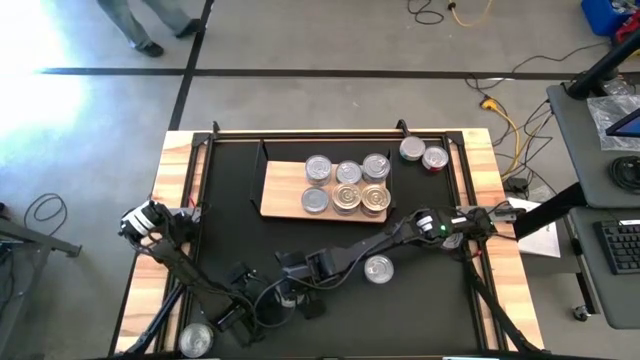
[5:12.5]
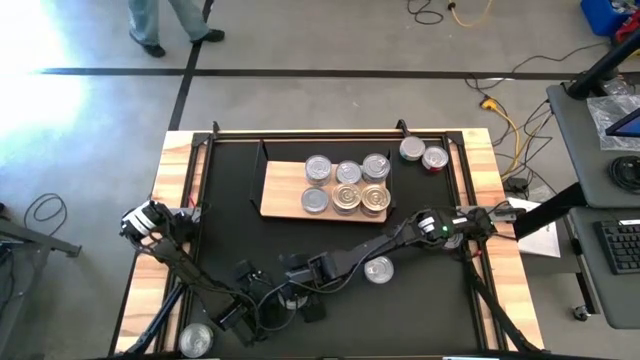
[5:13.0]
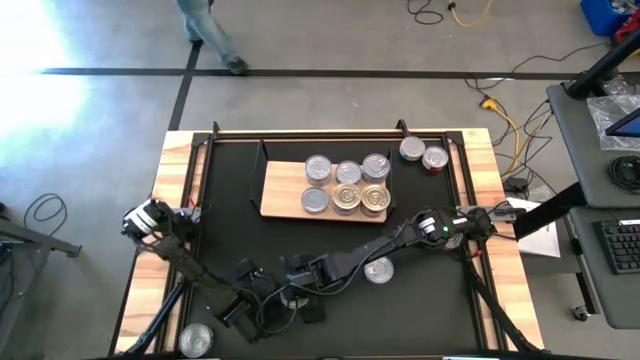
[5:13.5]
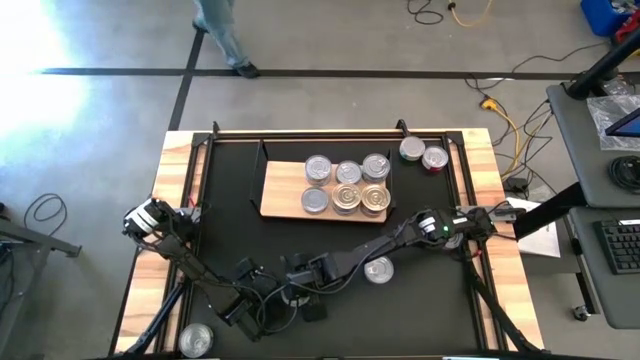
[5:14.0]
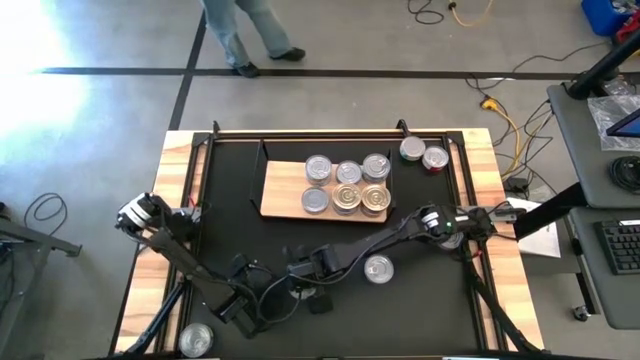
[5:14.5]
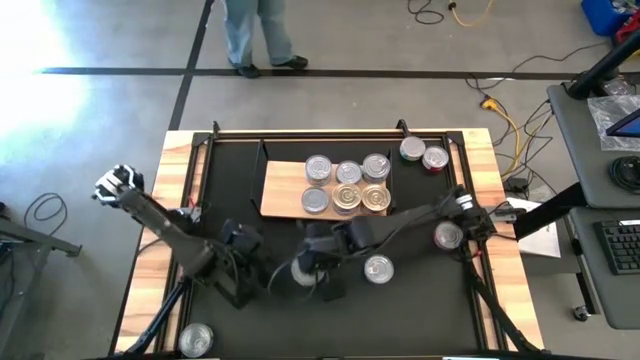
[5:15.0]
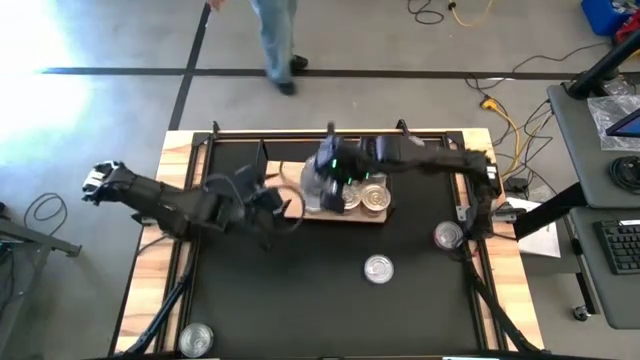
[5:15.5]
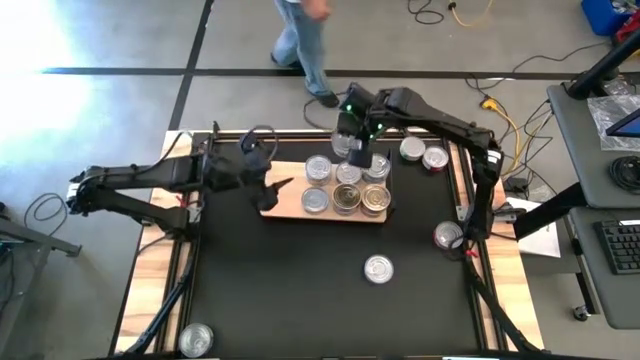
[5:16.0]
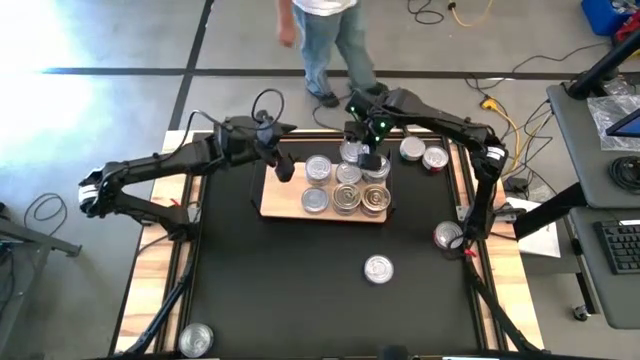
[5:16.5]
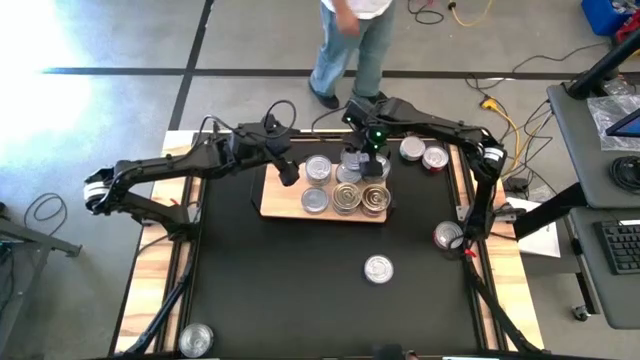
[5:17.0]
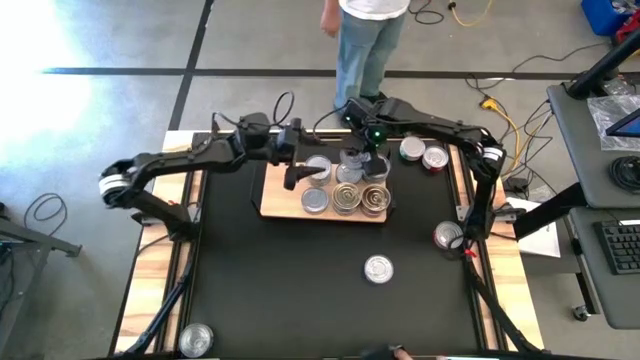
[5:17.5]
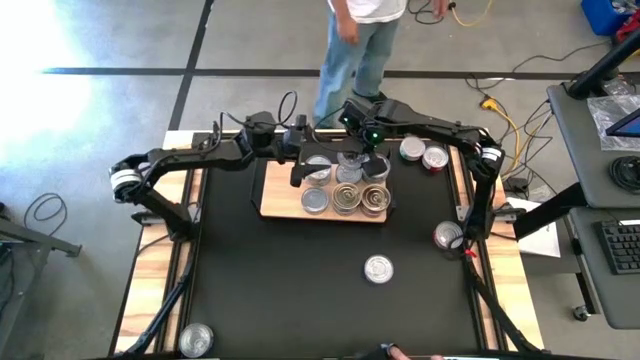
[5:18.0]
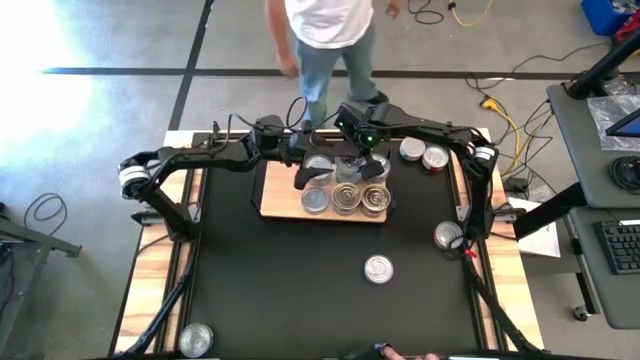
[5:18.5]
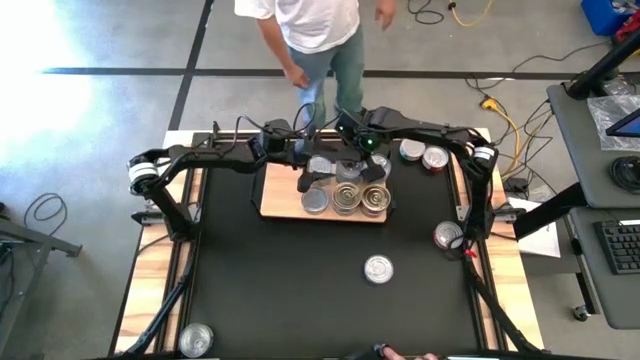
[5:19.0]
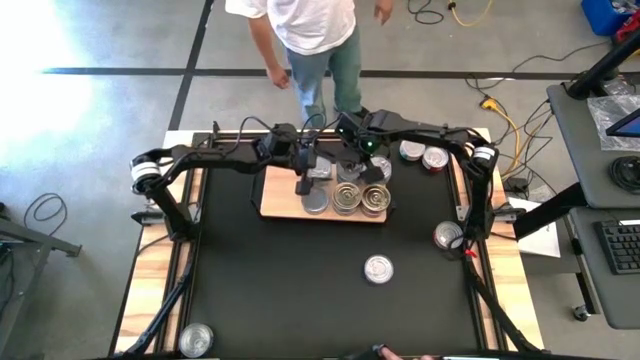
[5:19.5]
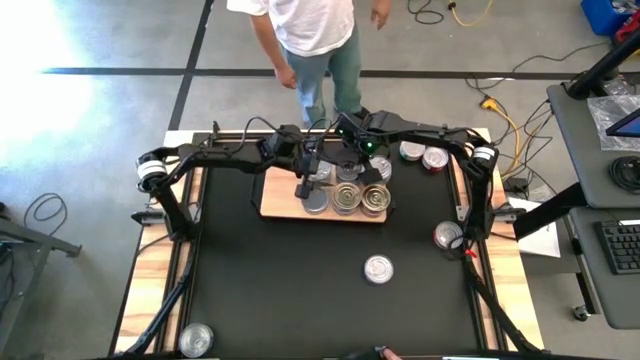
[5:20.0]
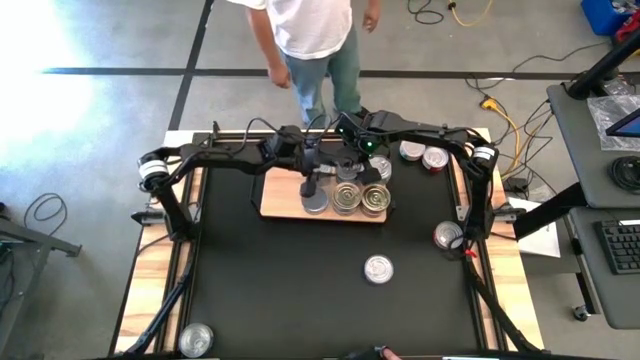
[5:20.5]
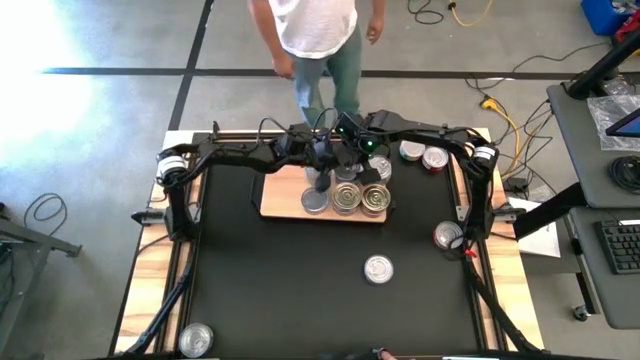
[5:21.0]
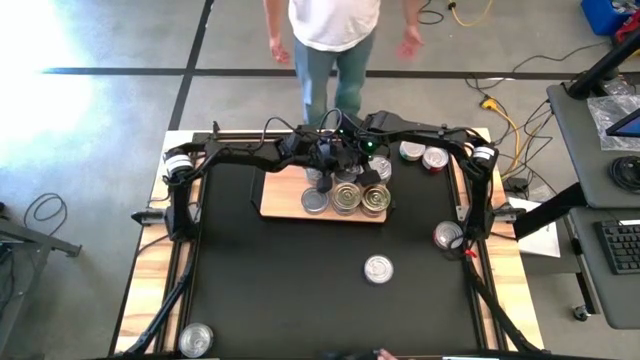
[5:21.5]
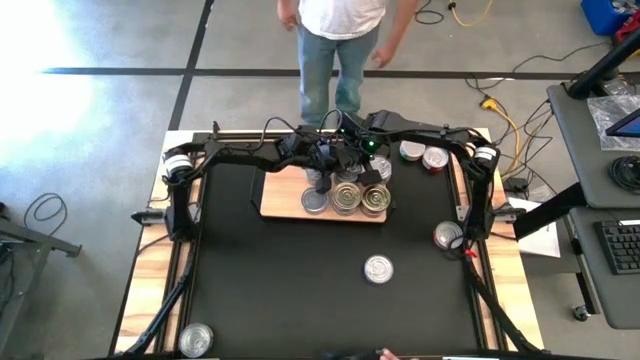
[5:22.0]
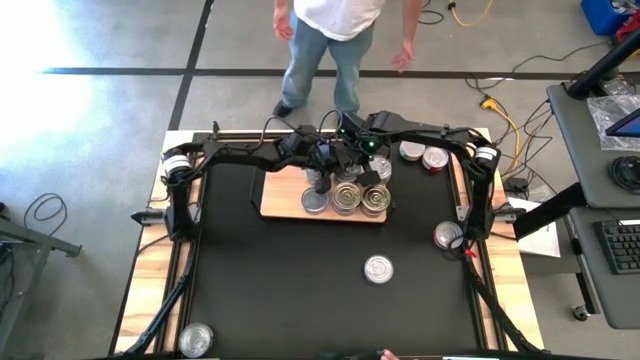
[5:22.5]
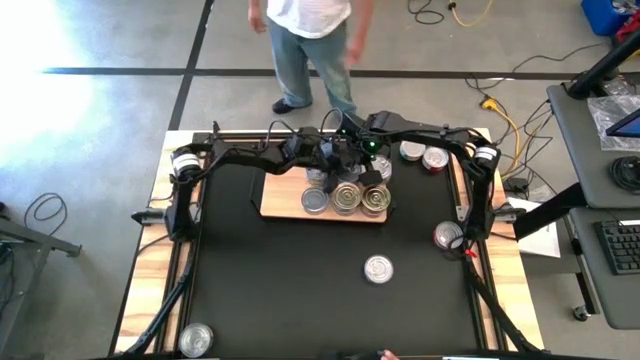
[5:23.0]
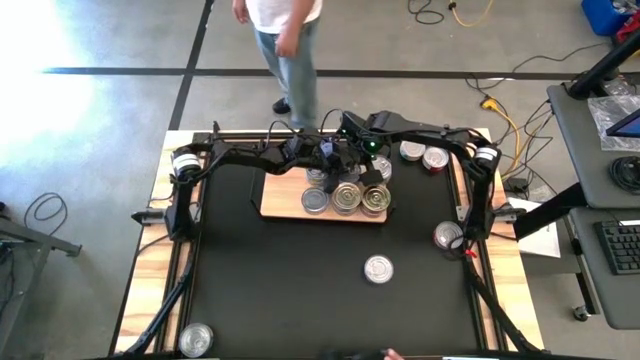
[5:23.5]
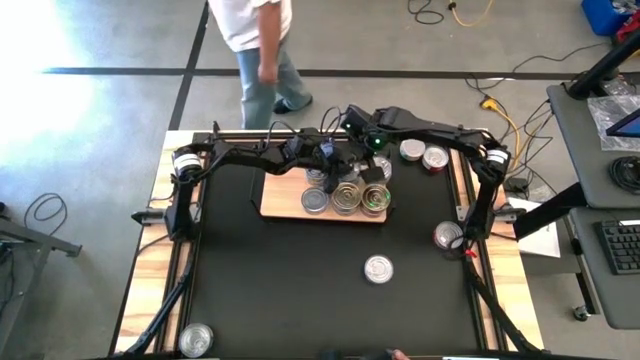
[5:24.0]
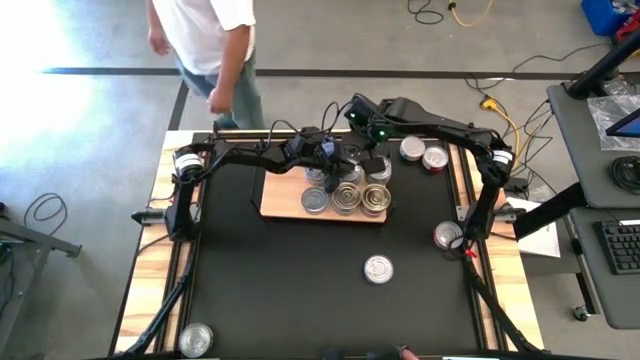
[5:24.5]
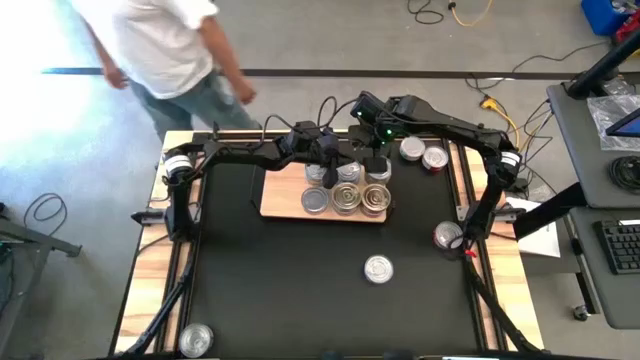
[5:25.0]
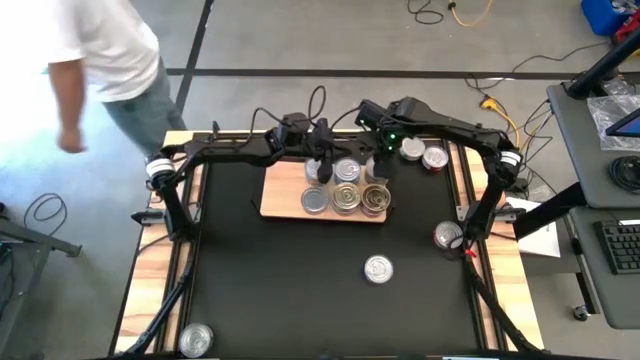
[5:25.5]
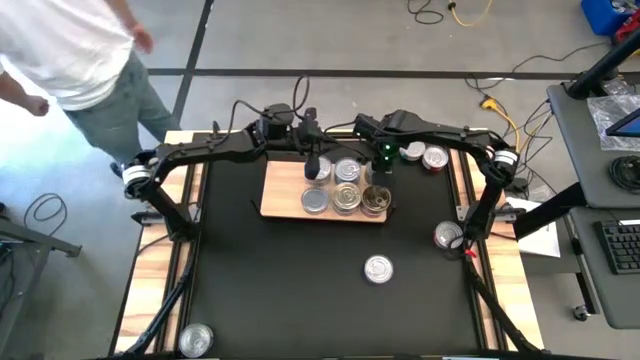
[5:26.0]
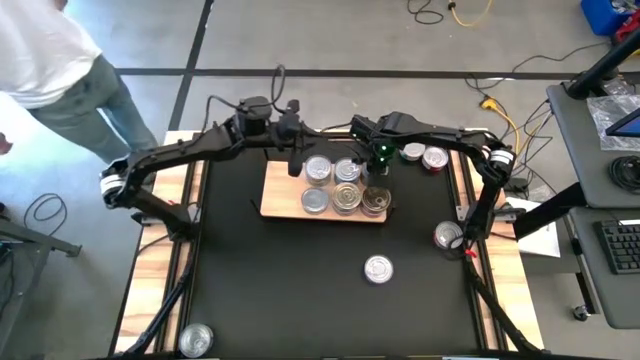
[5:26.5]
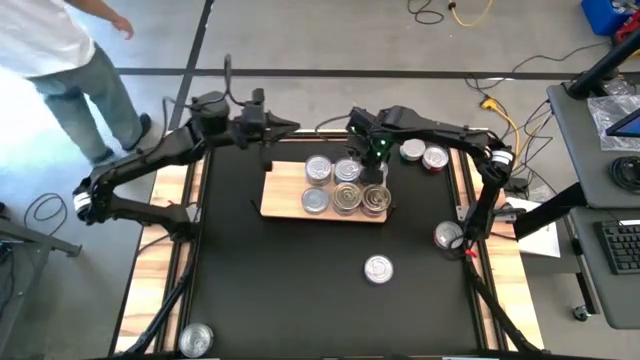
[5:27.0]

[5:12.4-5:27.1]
Task: Stack canned seafood by type on shelf
Stack the bottom left light blue tuna can on the light blue tuna can

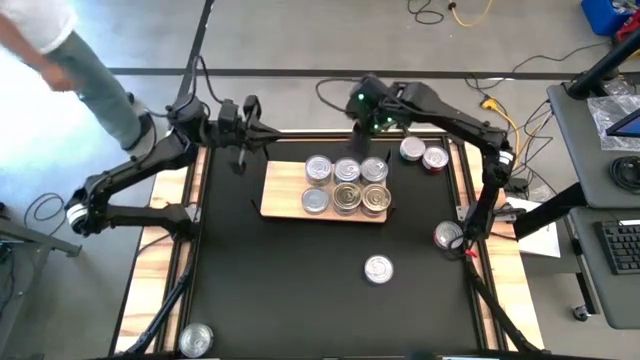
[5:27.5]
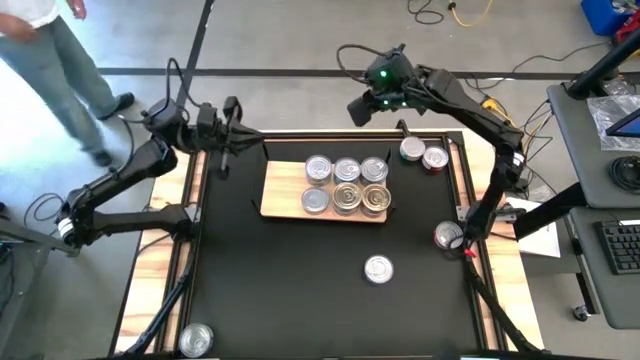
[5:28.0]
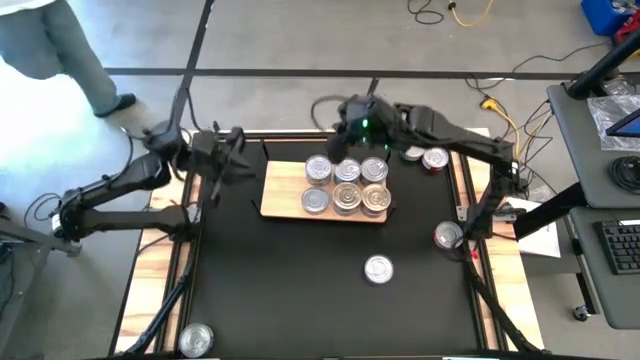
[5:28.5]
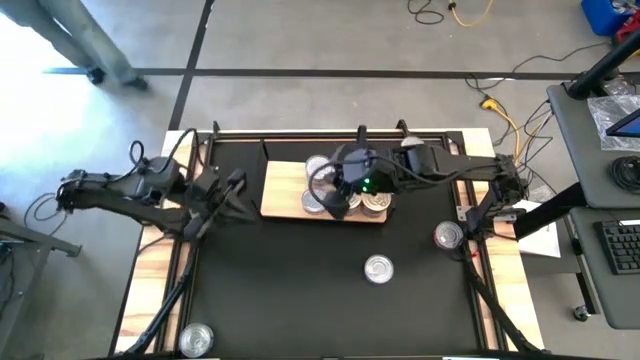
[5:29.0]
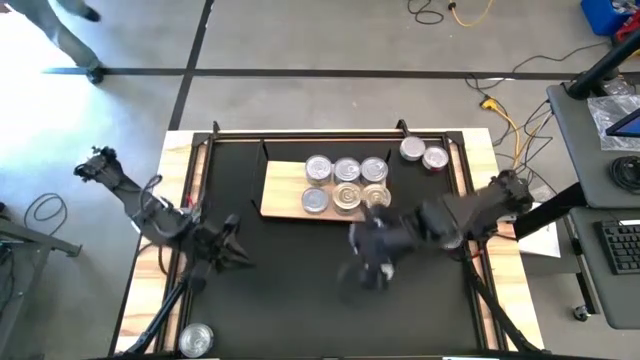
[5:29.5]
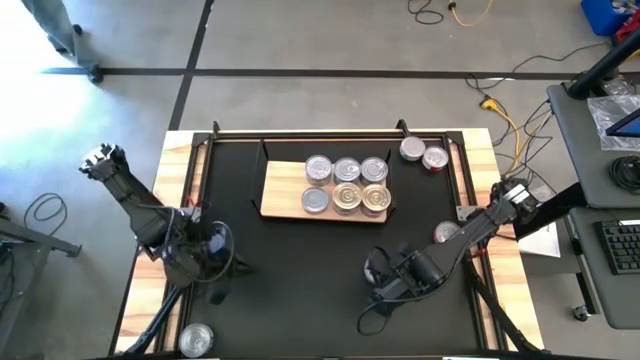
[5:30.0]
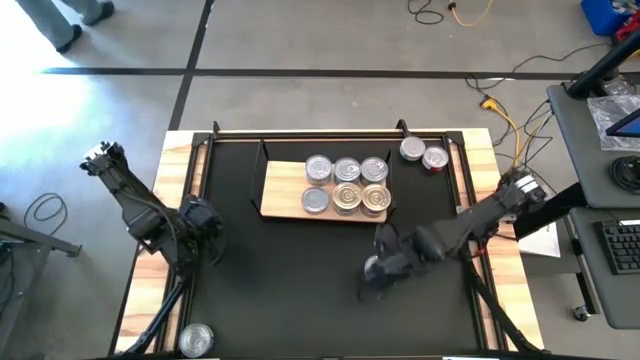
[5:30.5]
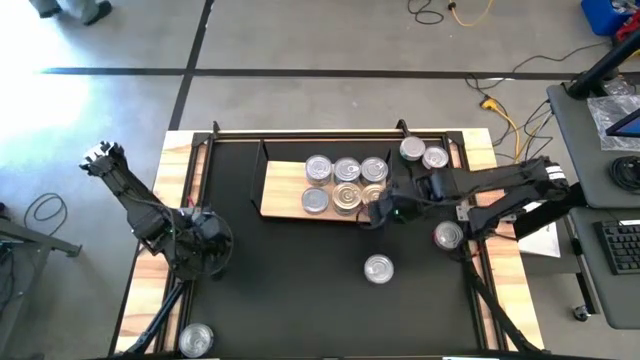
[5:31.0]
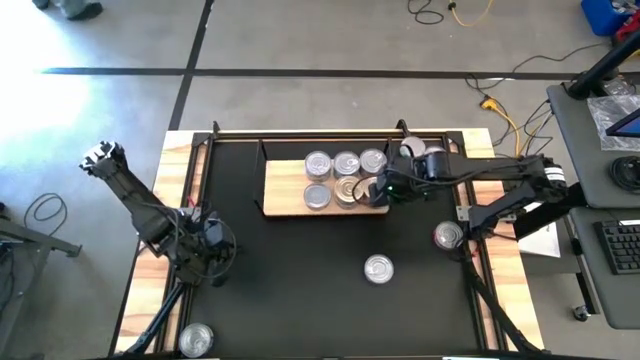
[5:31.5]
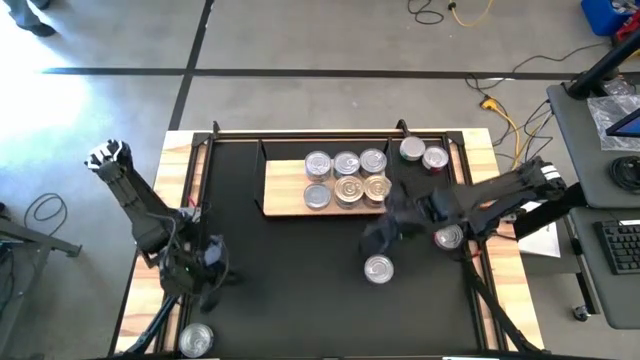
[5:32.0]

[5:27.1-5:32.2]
Adjust the shelf

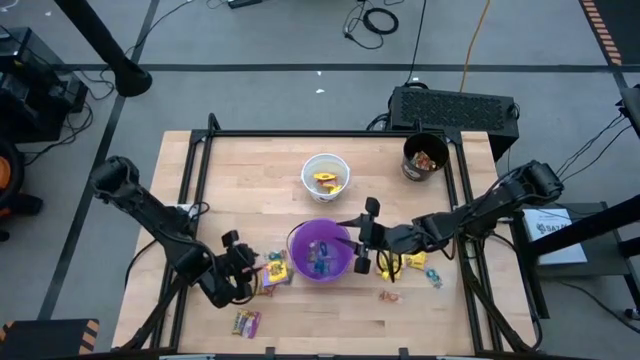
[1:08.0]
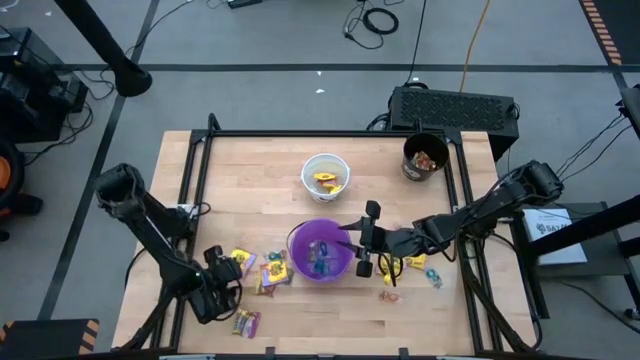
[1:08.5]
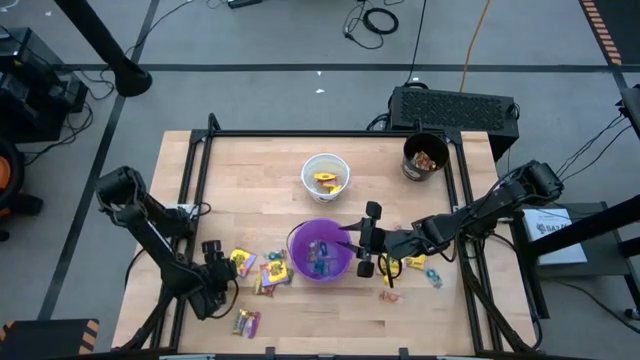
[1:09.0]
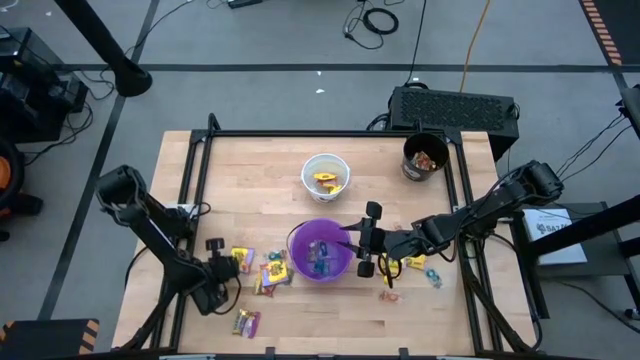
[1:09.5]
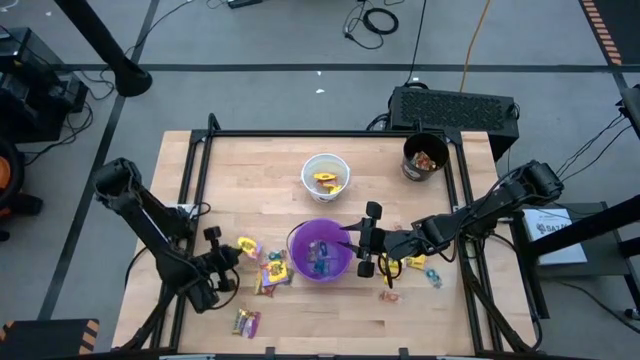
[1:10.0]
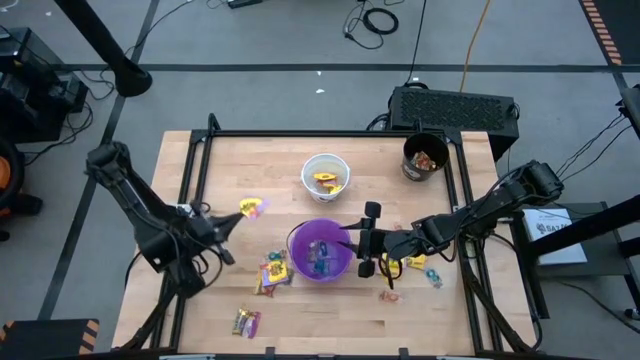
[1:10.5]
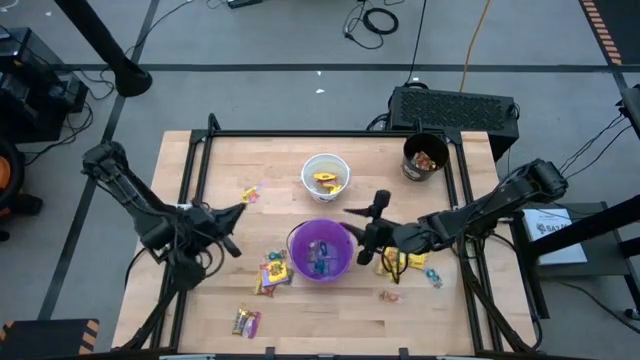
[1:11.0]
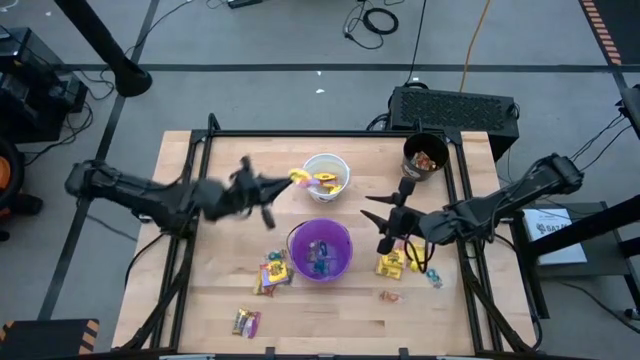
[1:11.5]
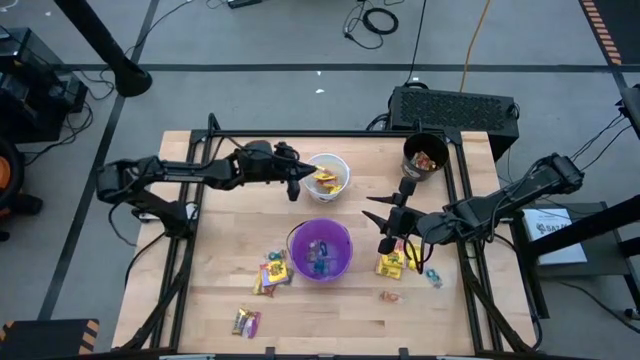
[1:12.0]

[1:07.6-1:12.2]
Task: Sort candy by brand, put in halloween buckets
Put the yellow candy into the white bucket
